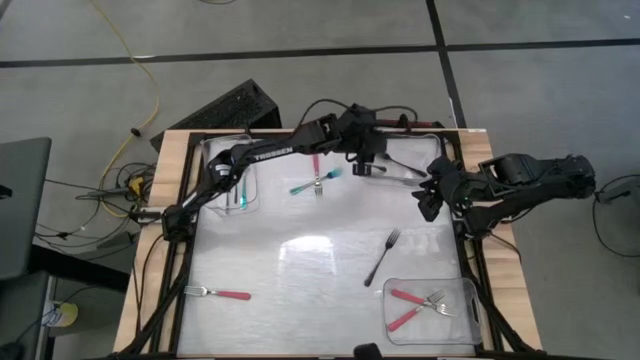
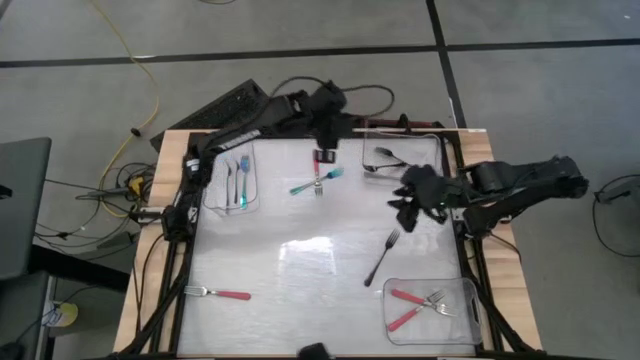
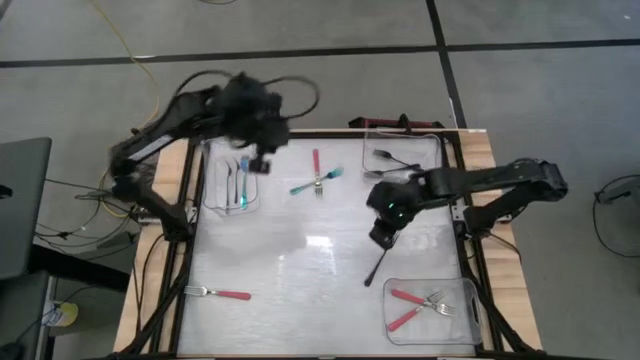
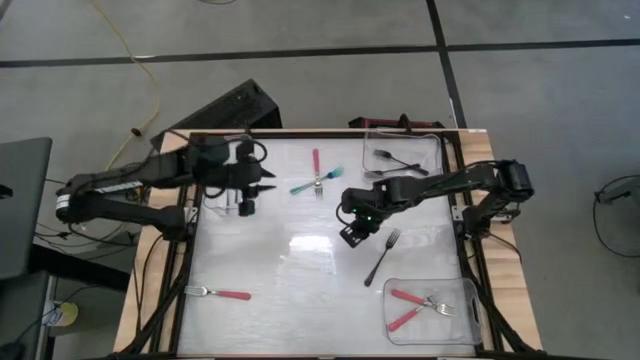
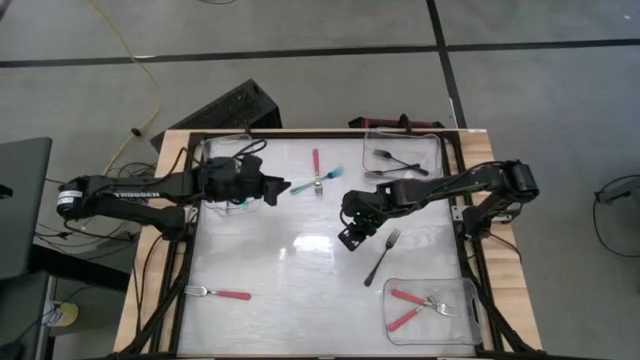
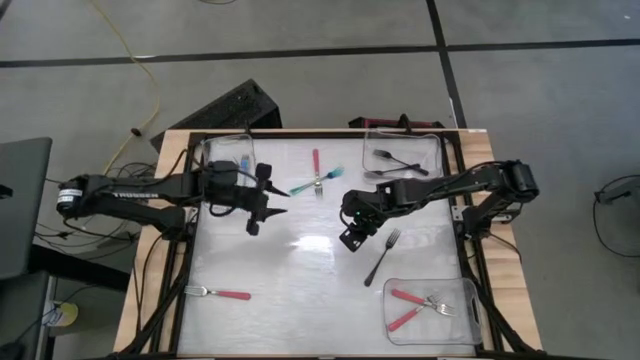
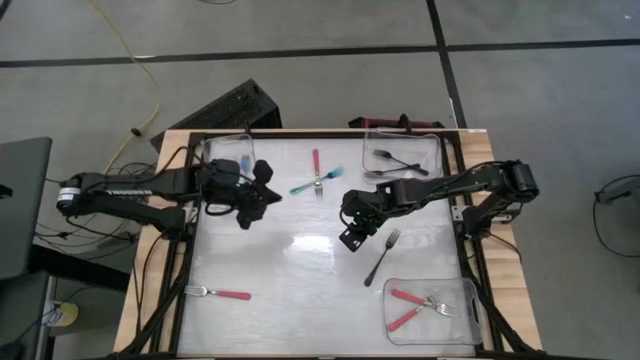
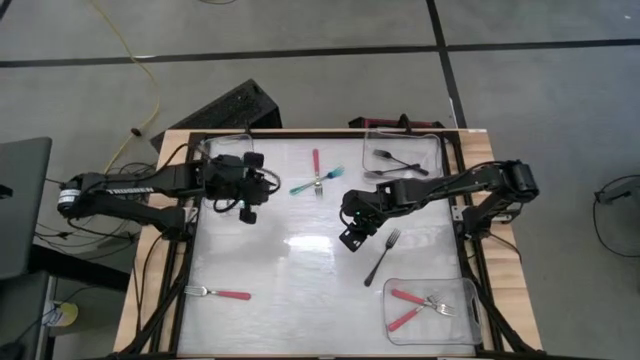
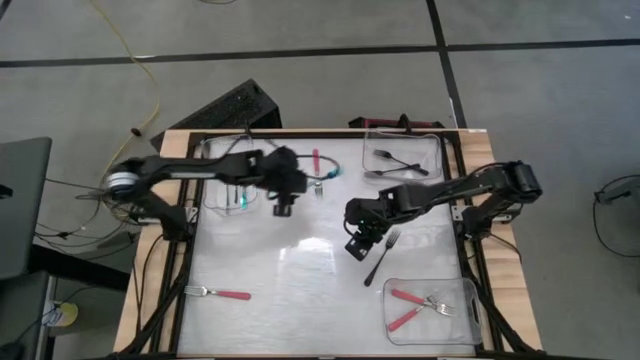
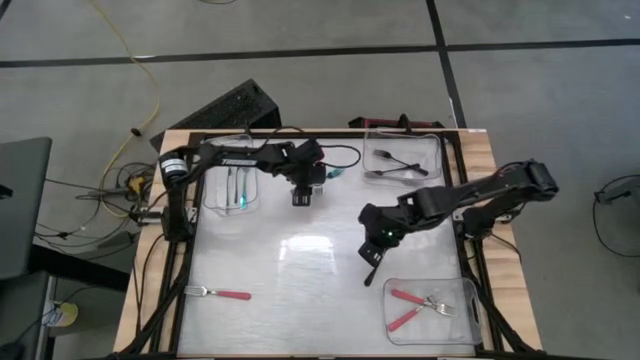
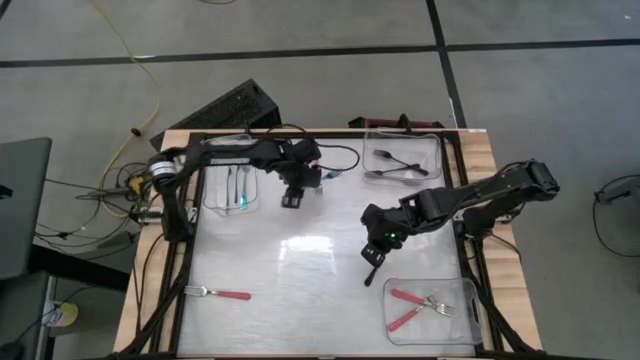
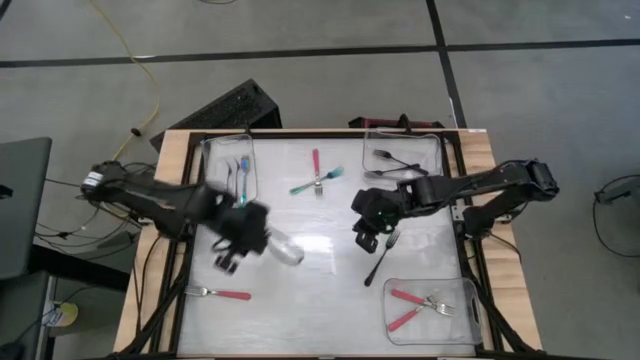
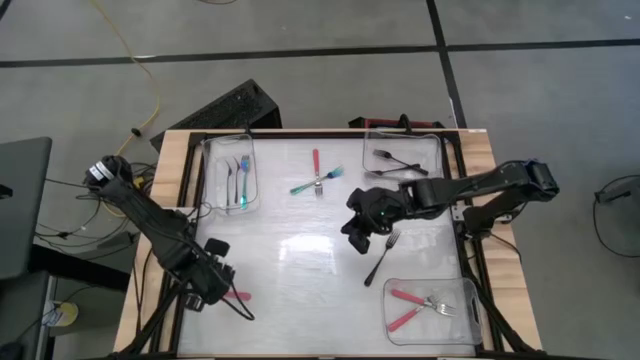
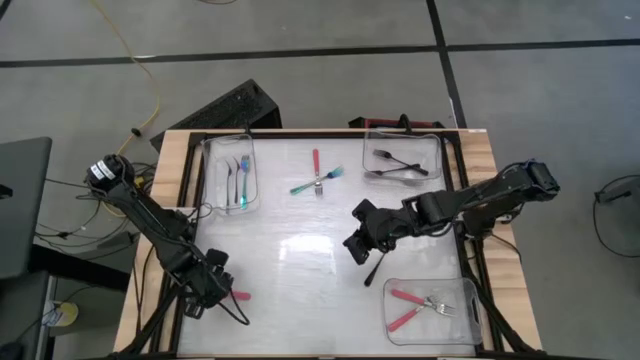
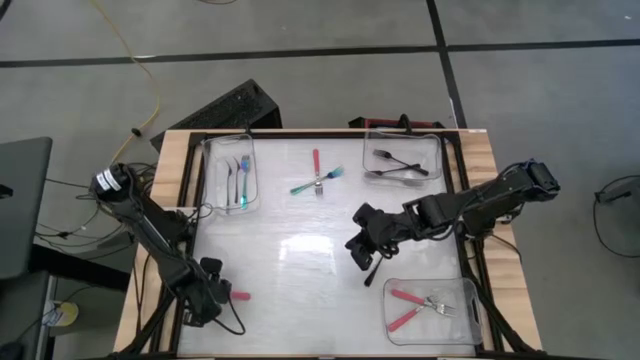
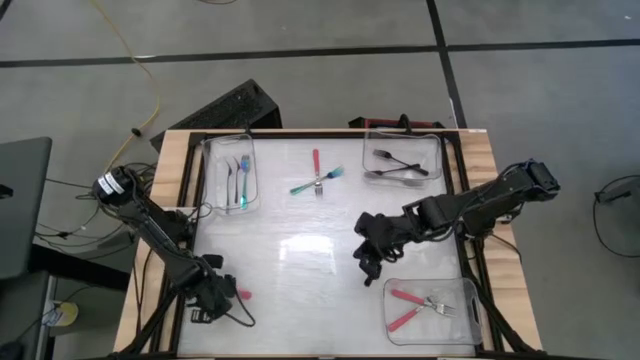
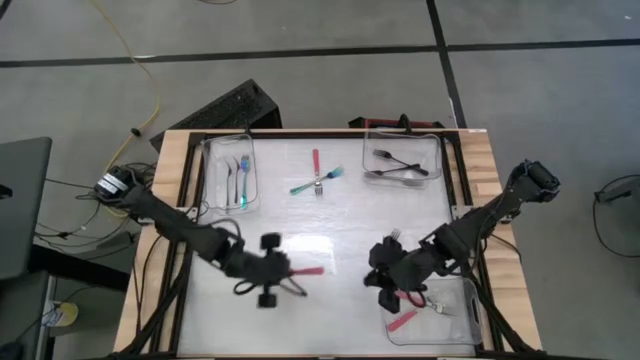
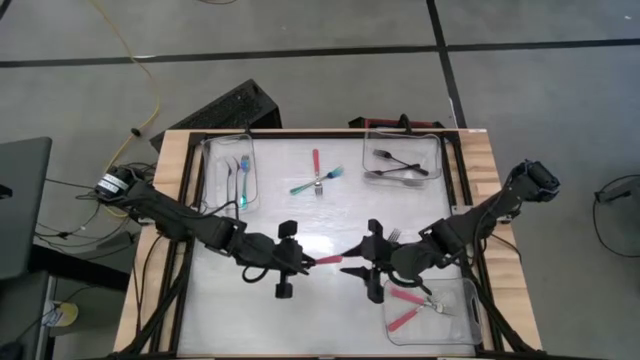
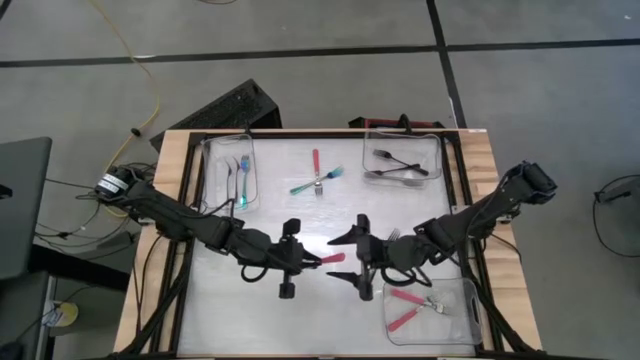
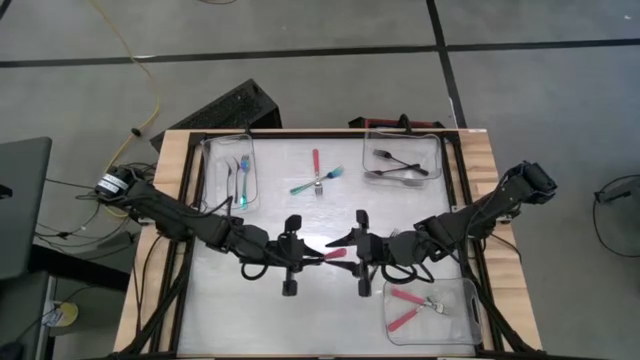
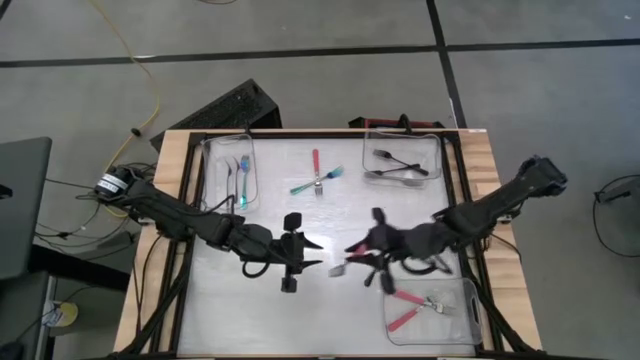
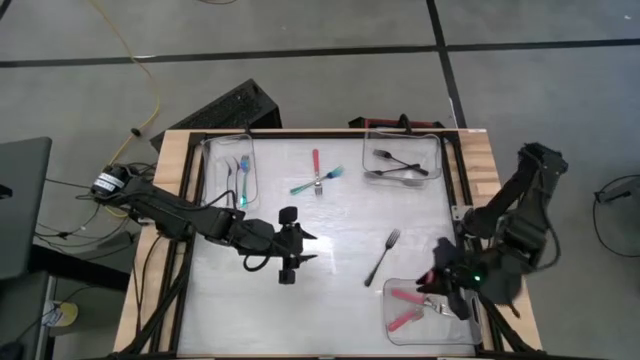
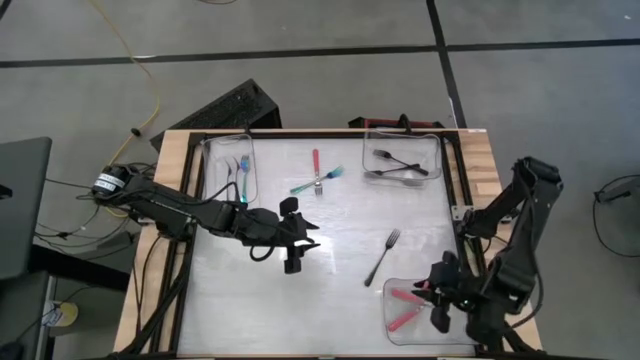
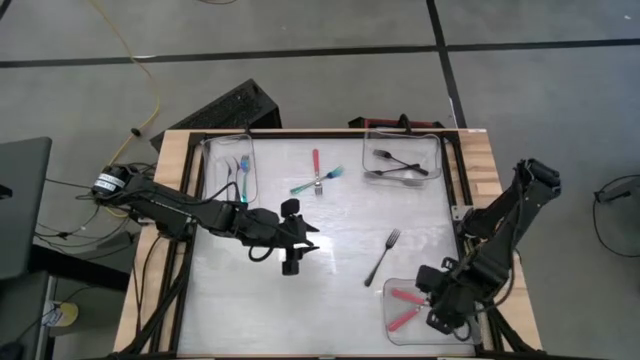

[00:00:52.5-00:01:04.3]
Task: Sort silverware by color (type)
Put the pink fork into the bottom right transparent bin

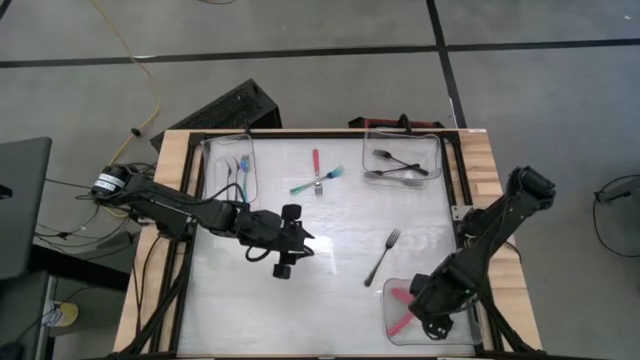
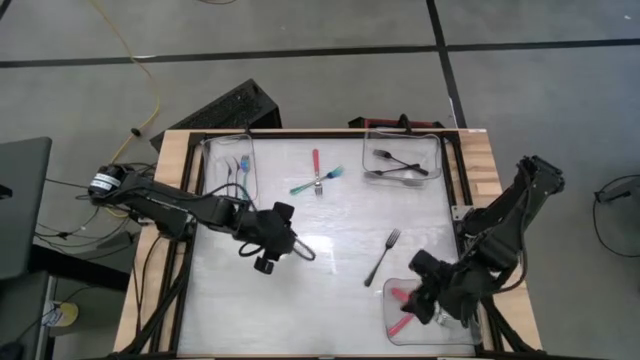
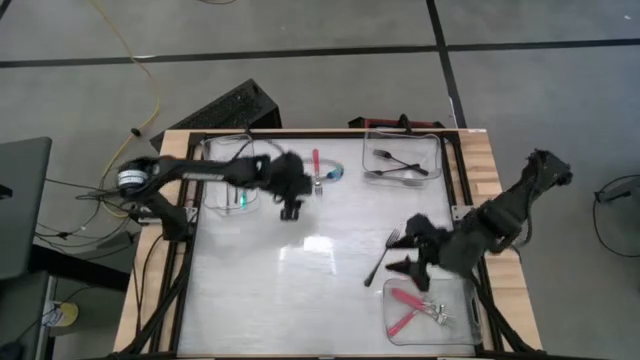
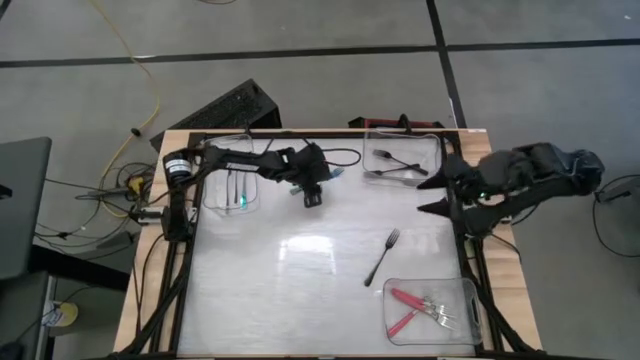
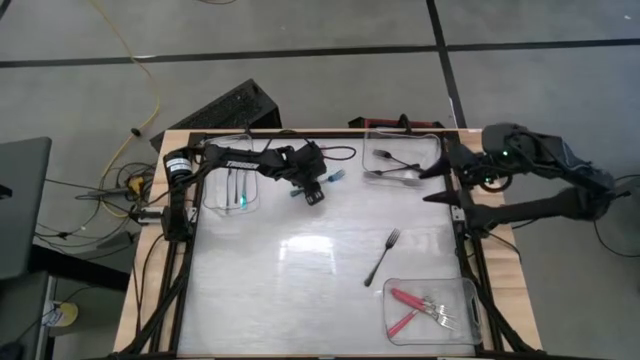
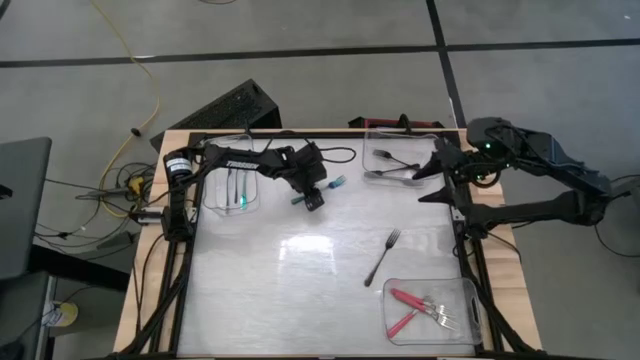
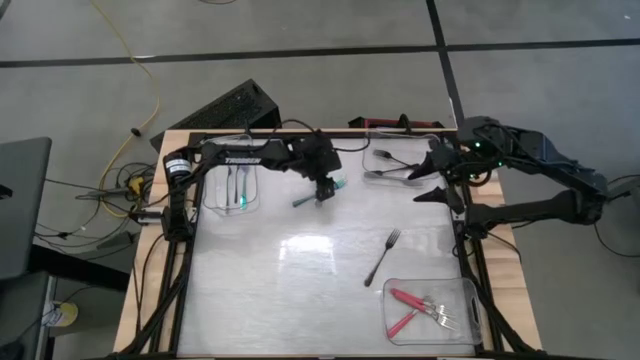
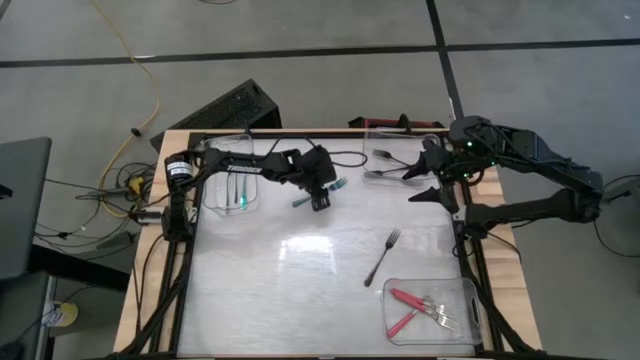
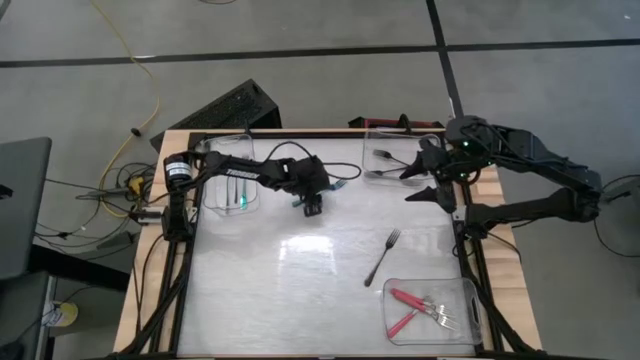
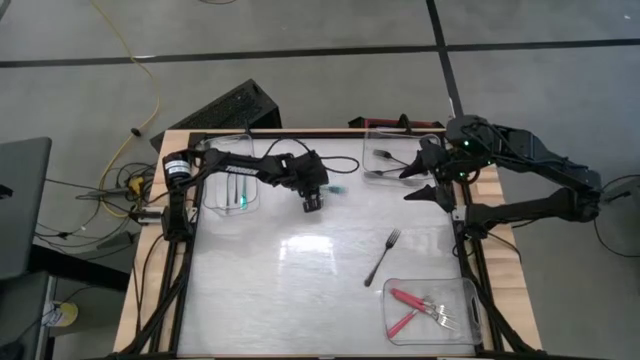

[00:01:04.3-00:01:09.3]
Put the blue fork into the left transparent bin

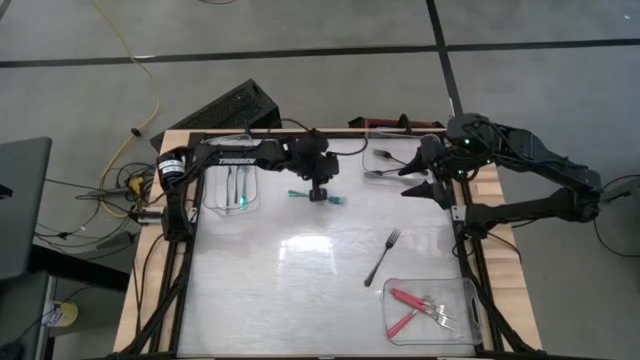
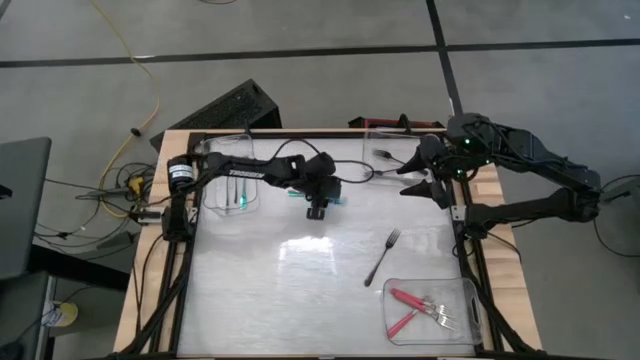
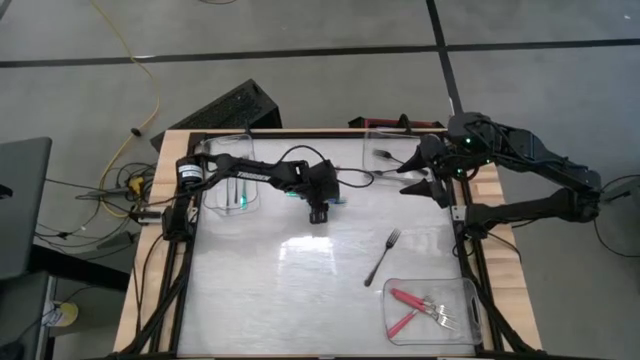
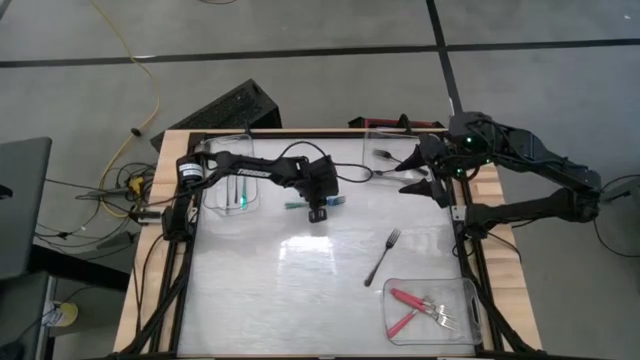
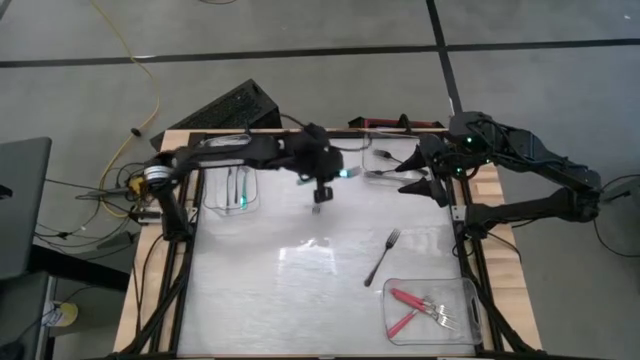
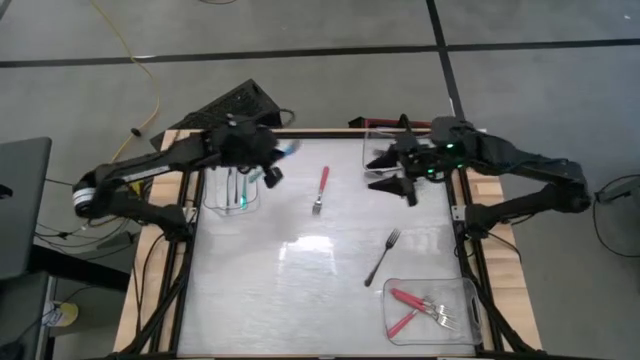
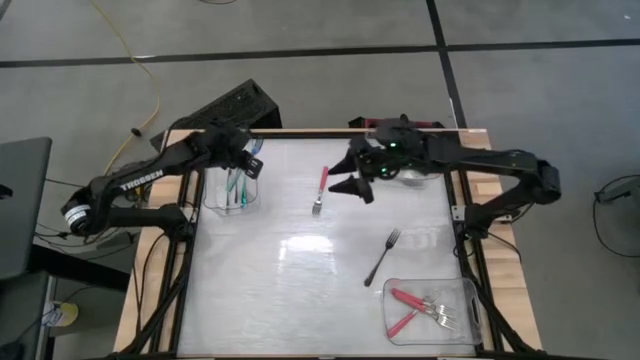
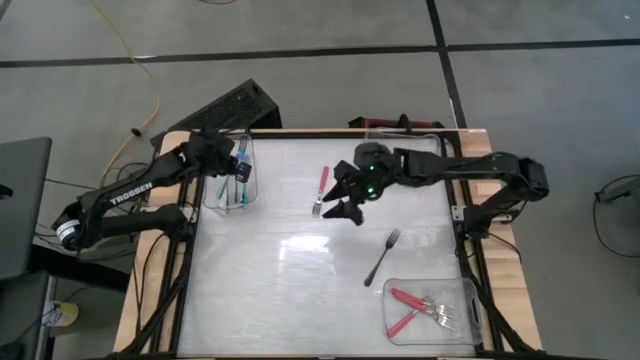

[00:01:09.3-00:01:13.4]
Put the blue fork into the left transparent bin
